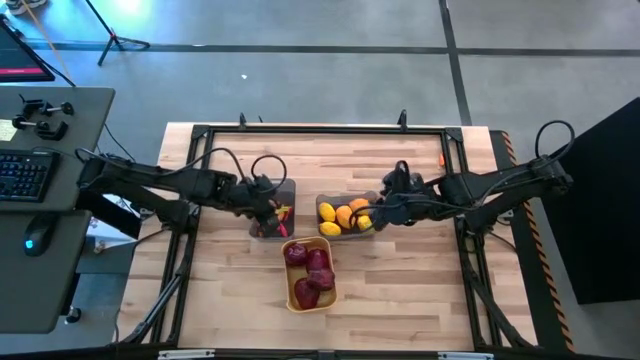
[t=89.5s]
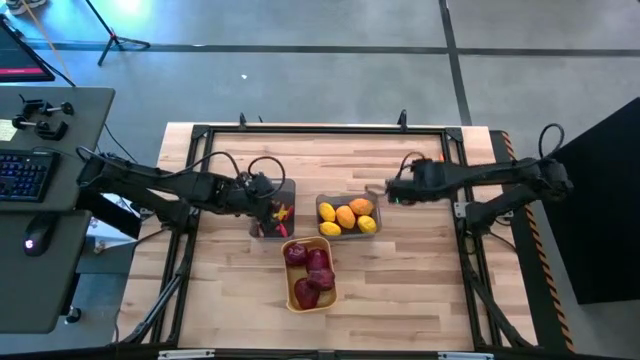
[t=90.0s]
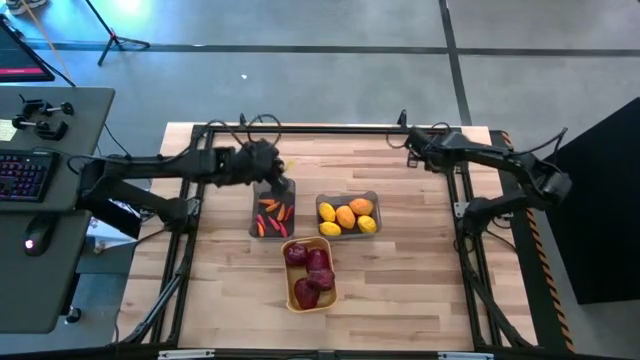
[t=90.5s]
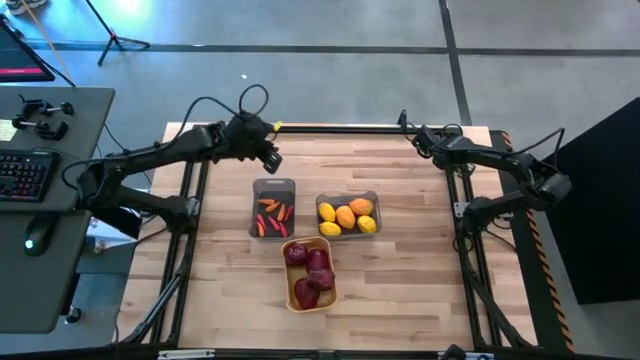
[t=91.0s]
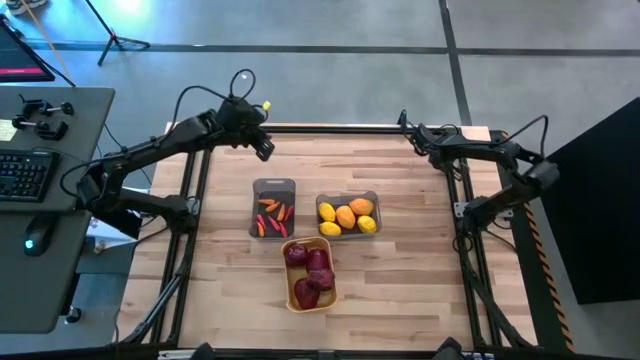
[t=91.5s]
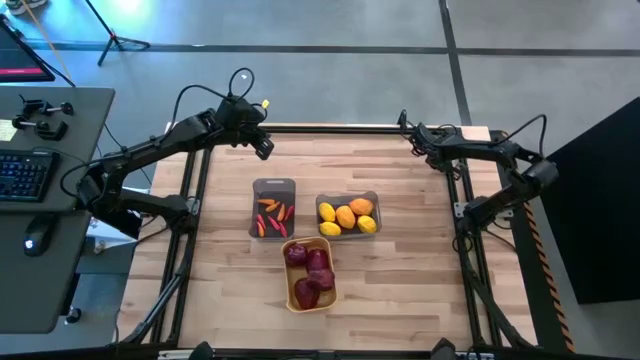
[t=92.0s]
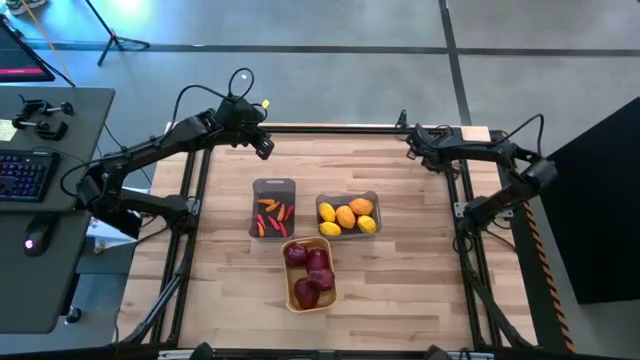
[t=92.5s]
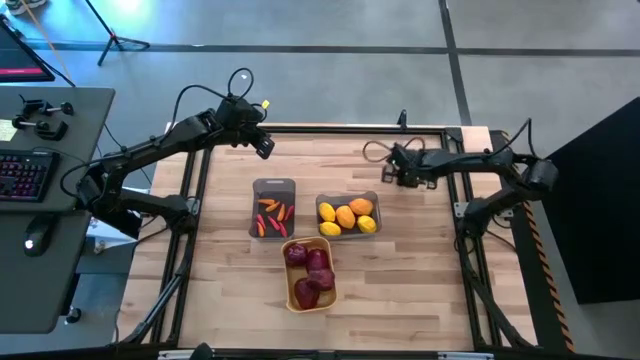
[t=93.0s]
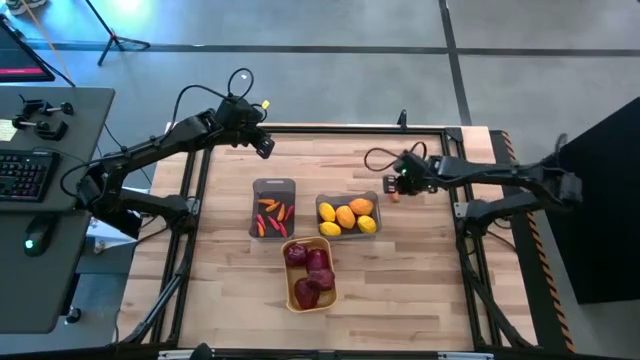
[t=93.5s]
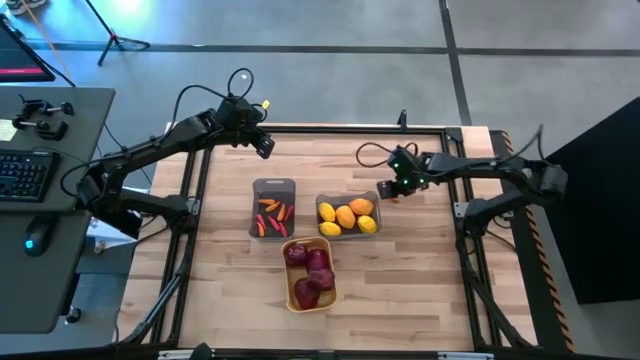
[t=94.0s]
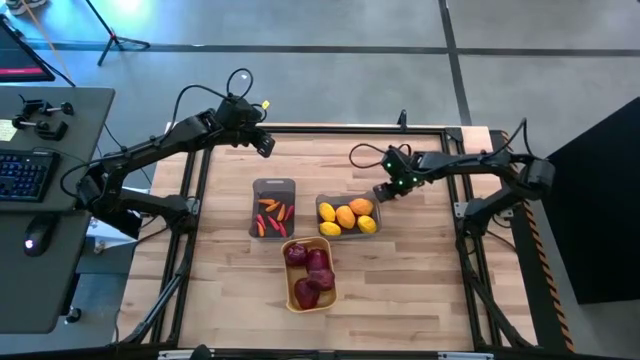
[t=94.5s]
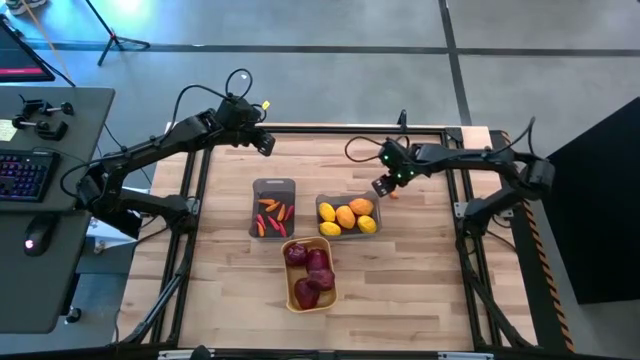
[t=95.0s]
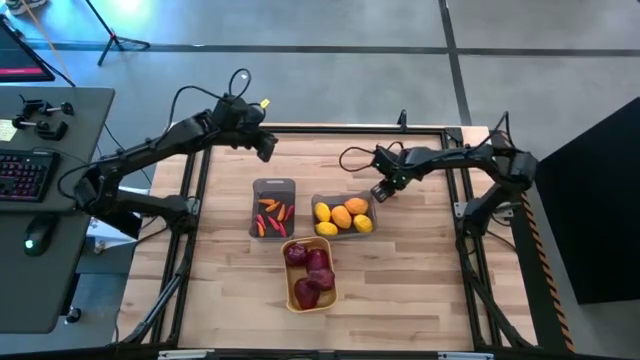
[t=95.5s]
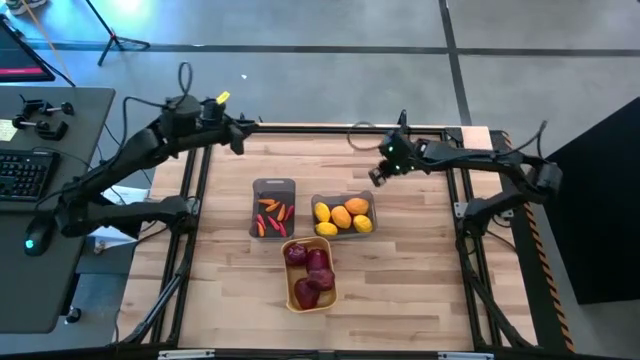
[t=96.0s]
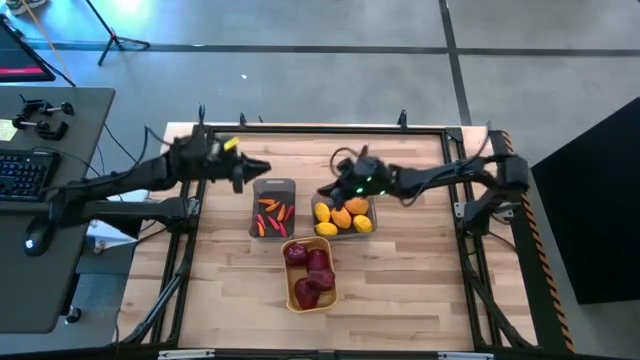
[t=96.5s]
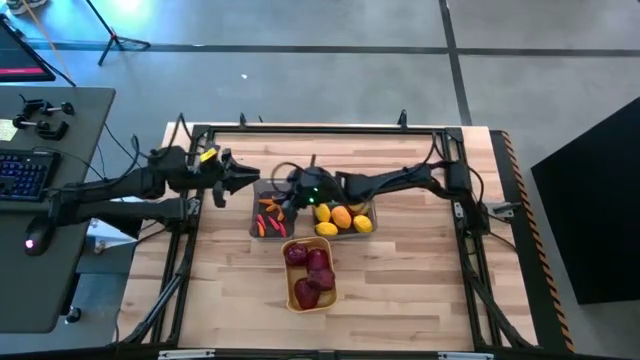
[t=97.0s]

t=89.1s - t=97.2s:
Task: Sort produce into baskets
Put the yellow chili pepper into the left black bin

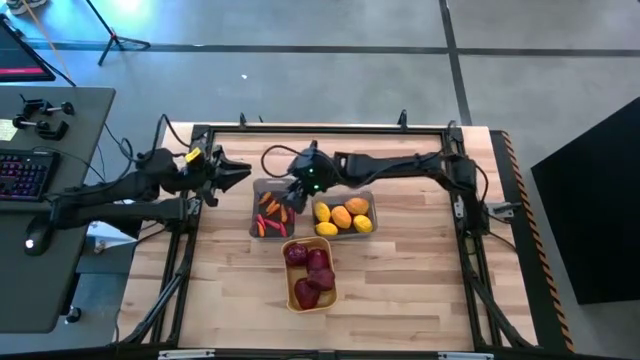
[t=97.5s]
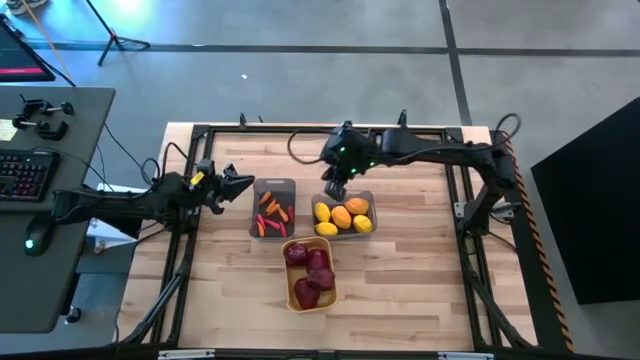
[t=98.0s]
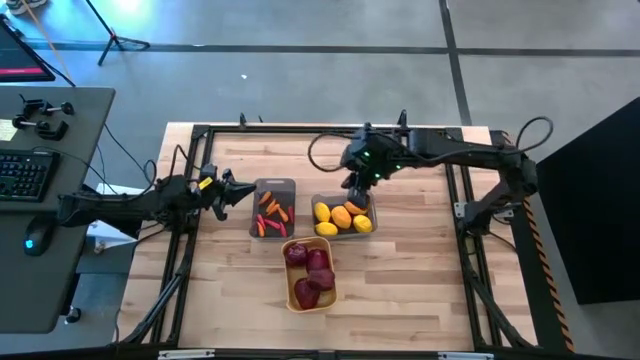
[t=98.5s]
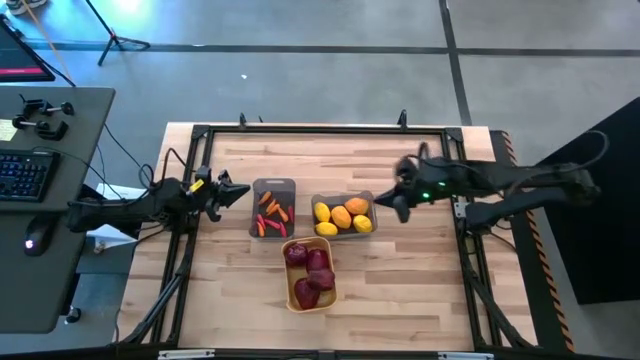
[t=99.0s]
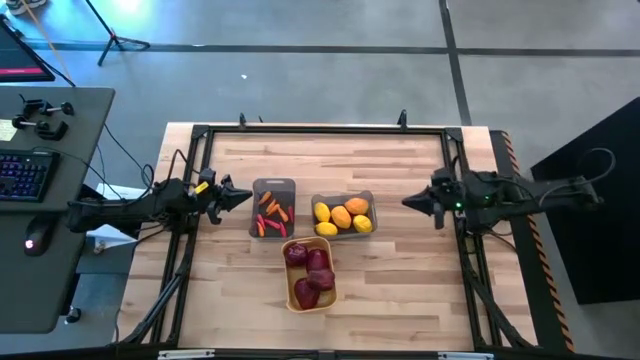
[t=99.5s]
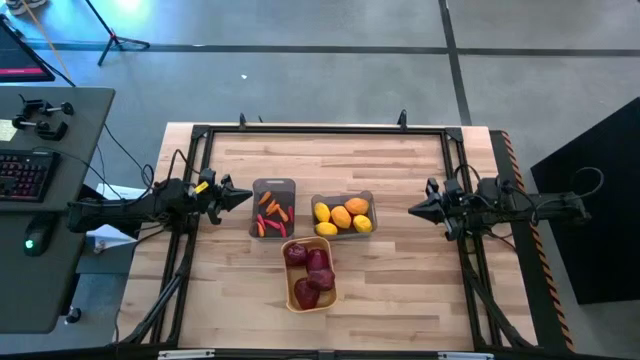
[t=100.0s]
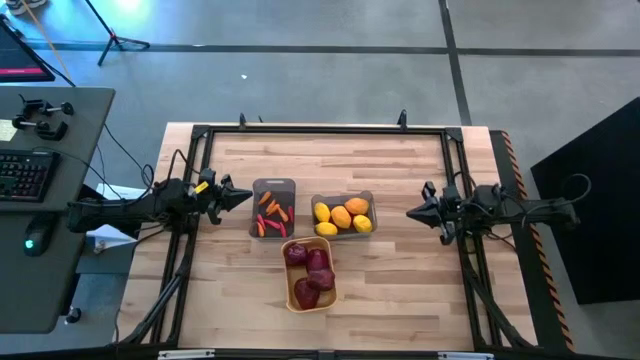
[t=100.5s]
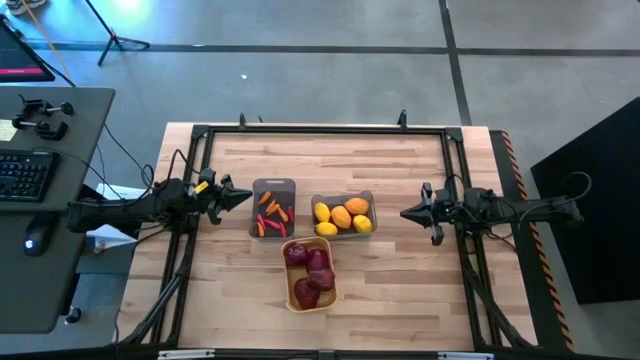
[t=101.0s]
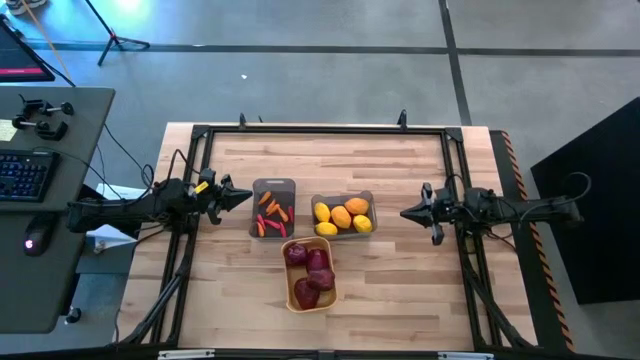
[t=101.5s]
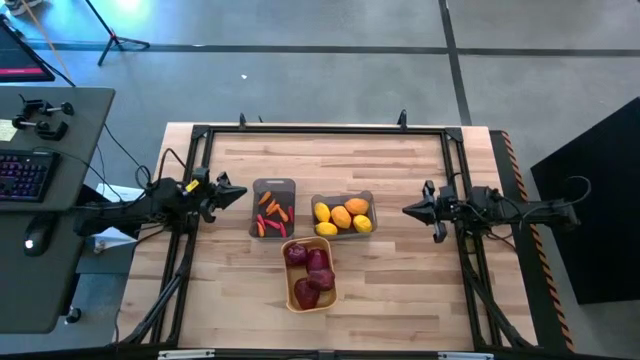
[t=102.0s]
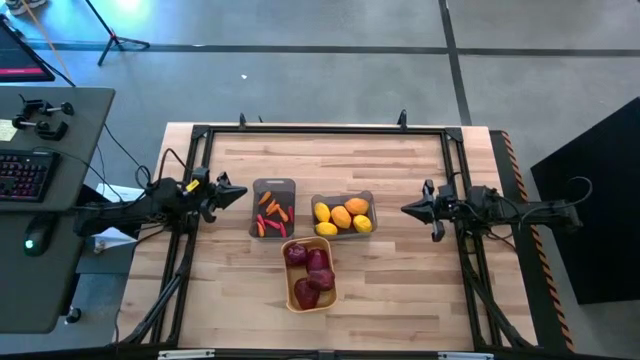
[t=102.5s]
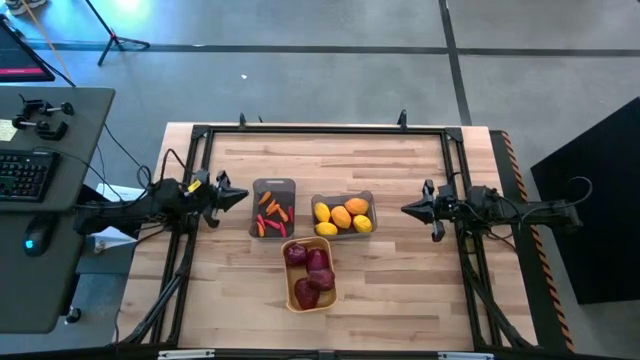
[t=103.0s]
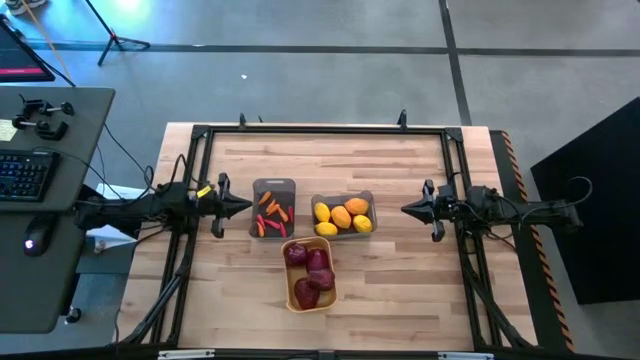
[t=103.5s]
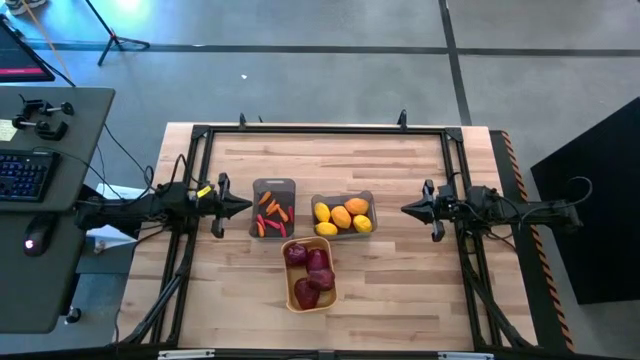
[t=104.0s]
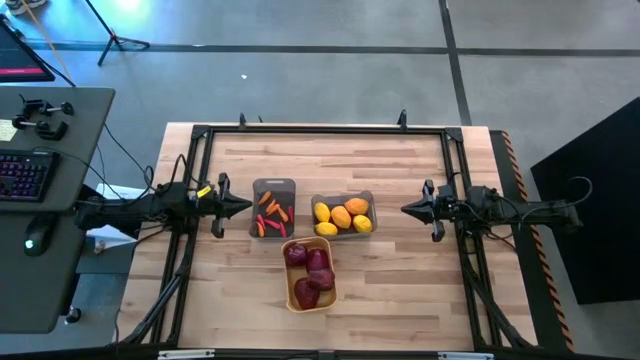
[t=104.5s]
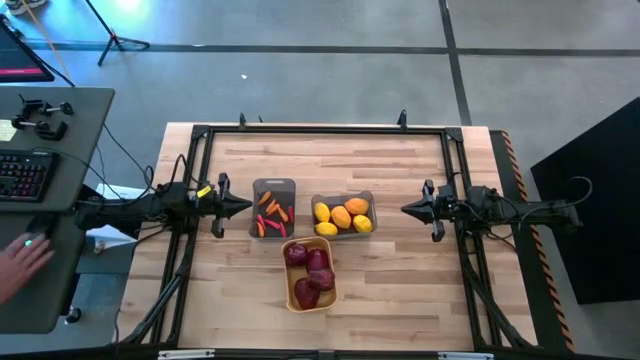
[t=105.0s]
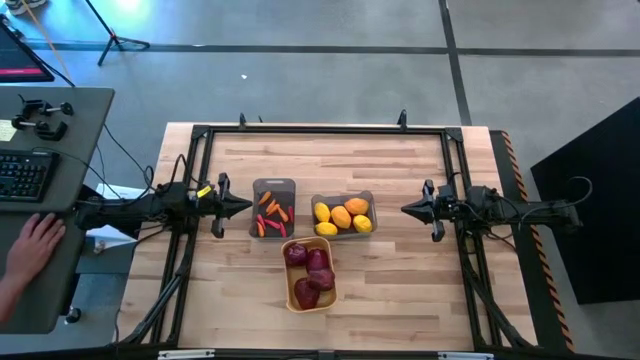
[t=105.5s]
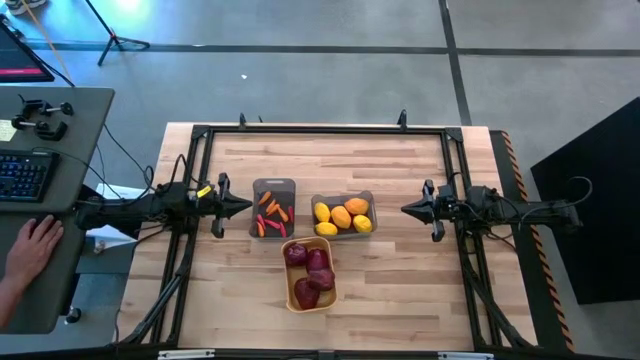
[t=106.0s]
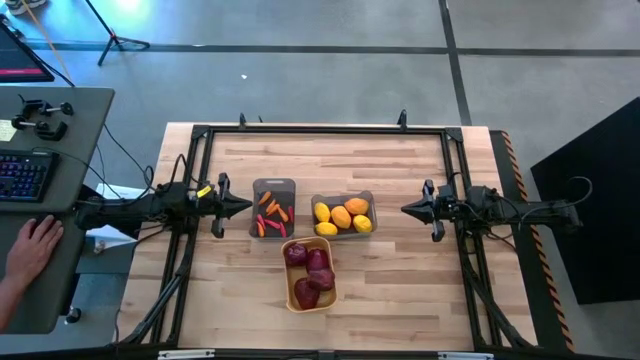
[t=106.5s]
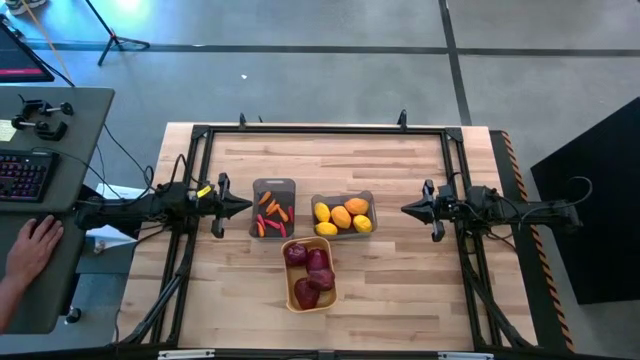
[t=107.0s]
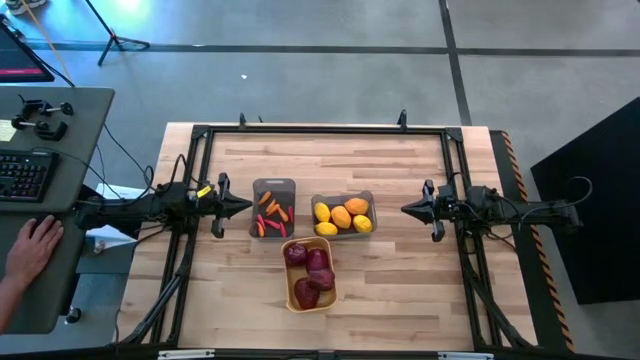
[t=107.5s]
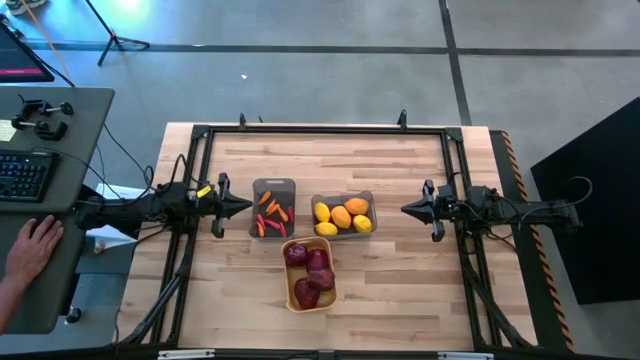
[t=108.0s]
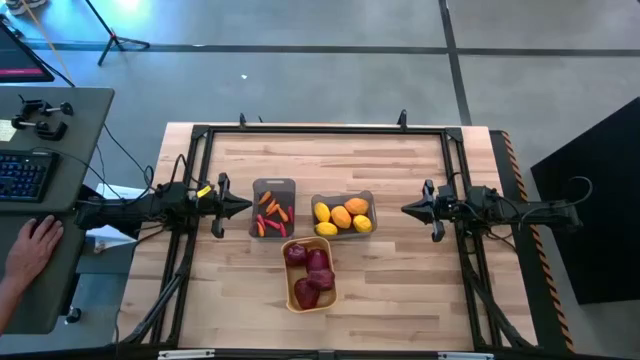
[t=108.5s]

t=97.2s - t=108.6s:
Return to Home Position

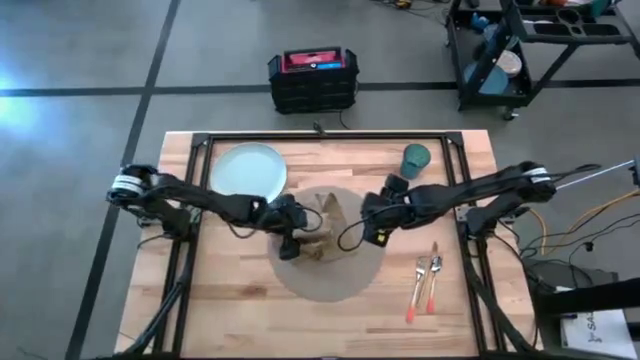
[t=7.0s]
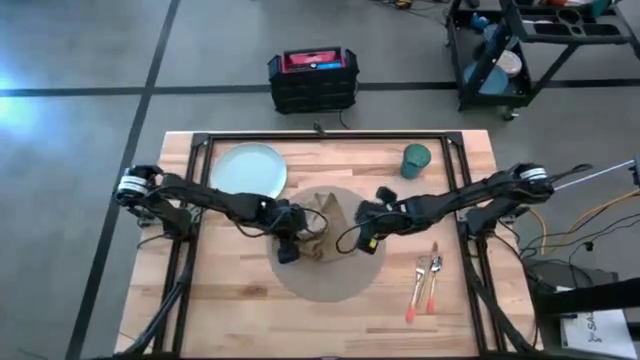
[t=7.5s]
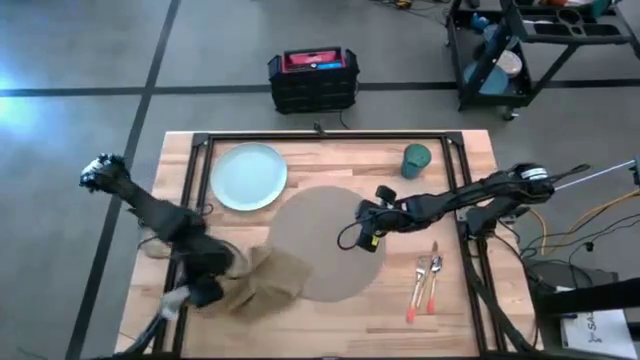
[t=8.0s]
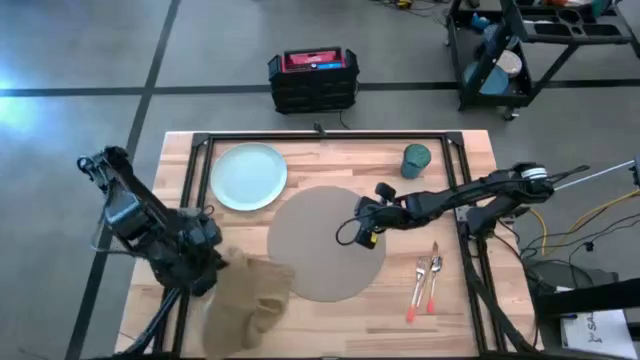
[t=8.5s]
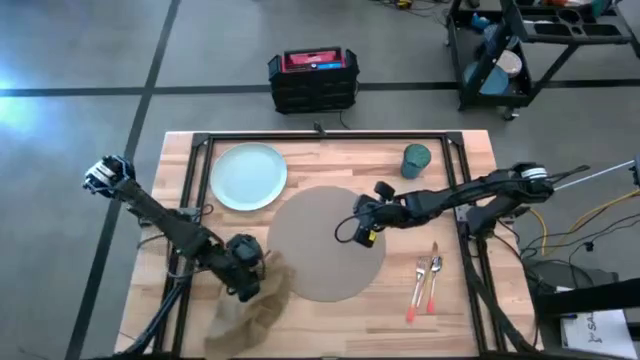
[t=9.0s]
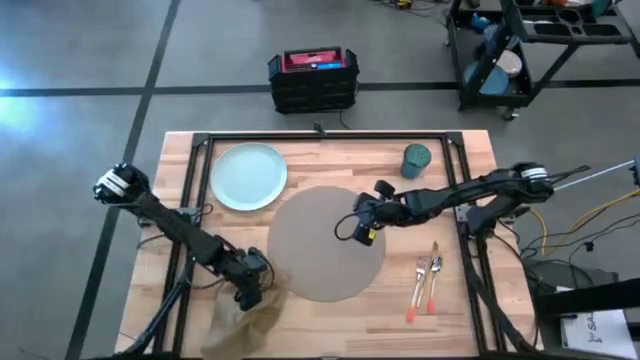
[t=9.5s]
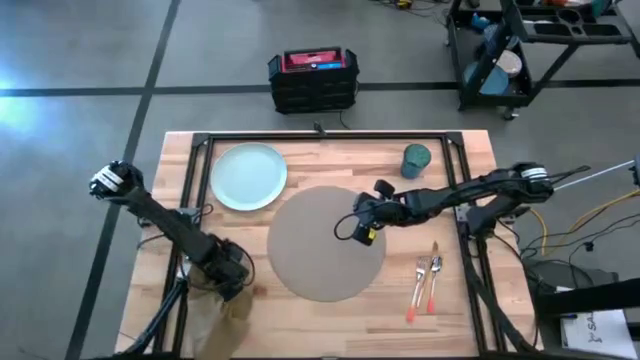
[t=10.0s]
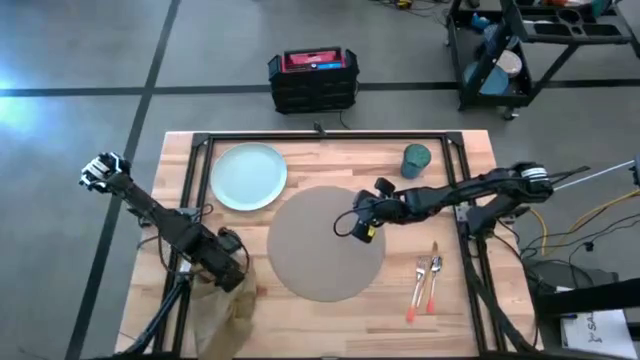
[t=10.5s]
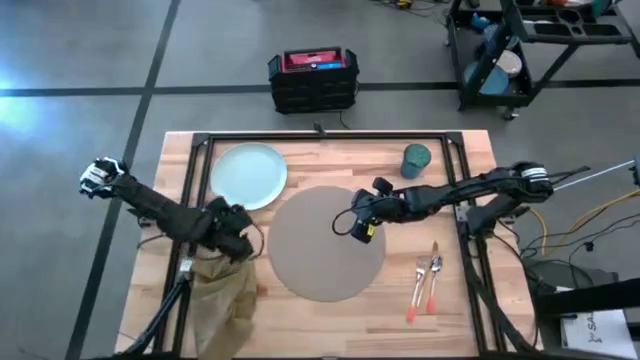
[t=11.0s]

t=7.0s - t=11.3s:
Task: Set table place
Move the brown table napkin to the bottom left of the table
